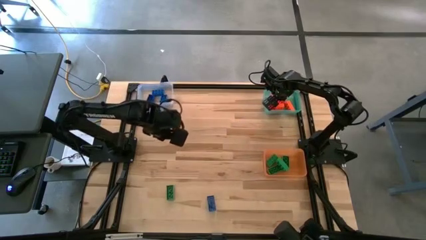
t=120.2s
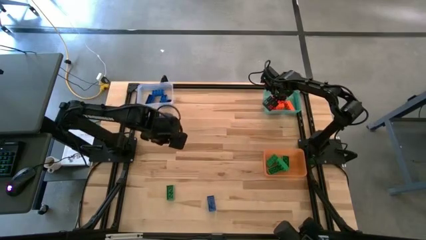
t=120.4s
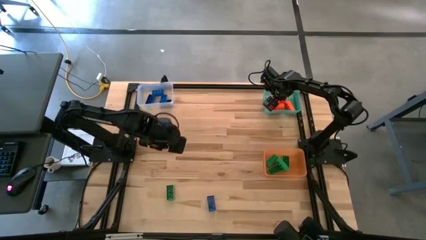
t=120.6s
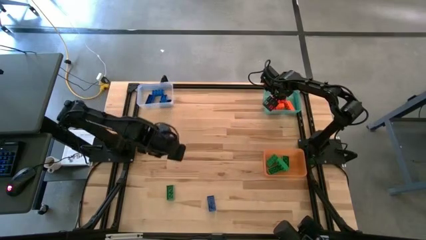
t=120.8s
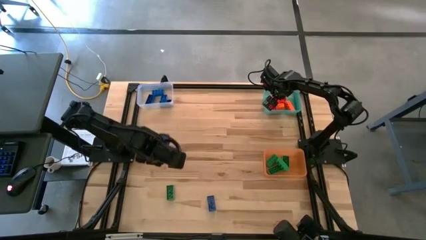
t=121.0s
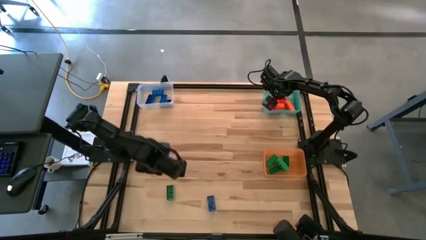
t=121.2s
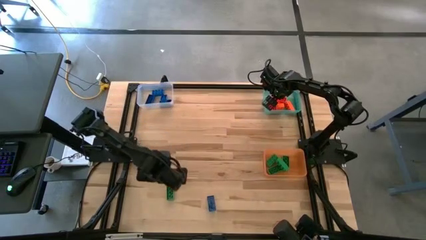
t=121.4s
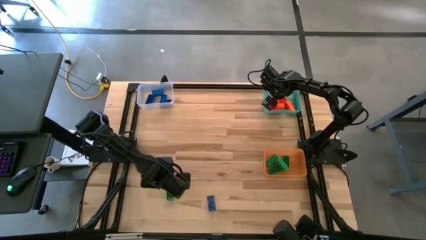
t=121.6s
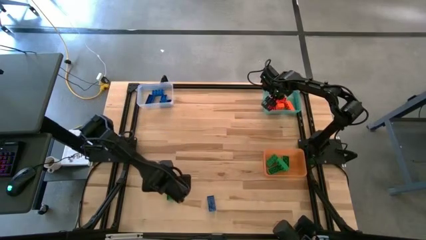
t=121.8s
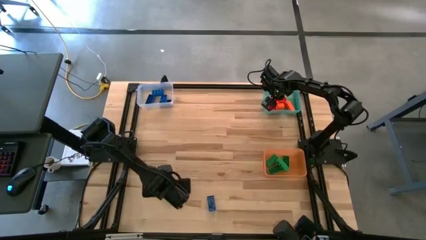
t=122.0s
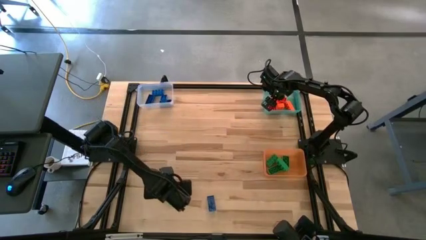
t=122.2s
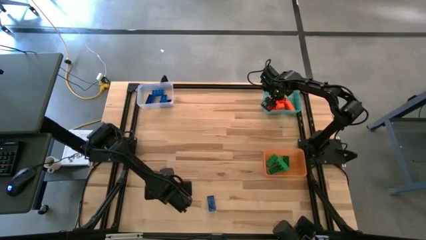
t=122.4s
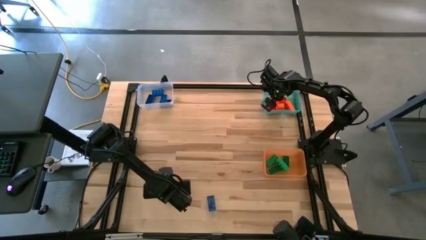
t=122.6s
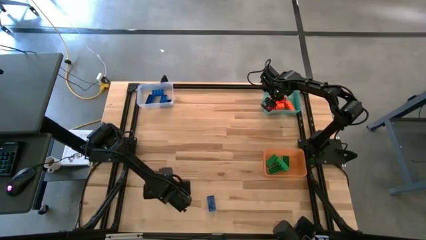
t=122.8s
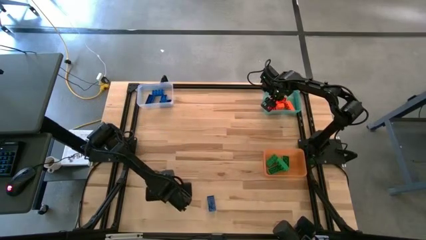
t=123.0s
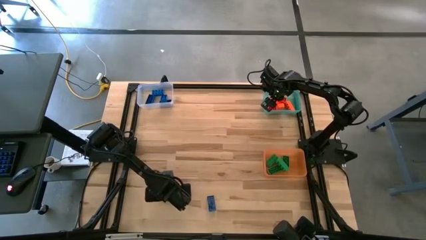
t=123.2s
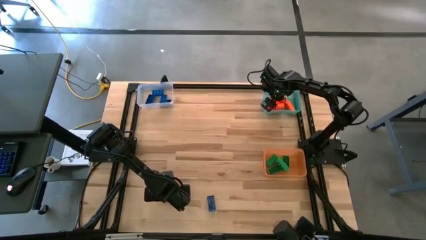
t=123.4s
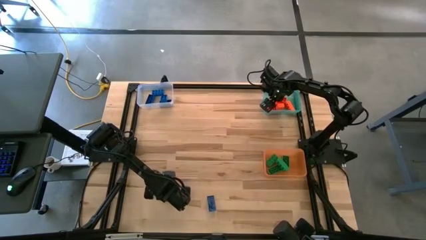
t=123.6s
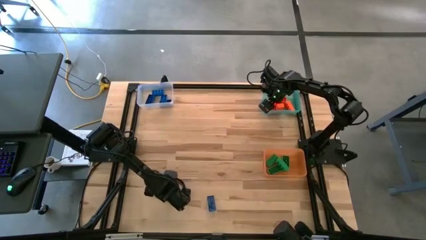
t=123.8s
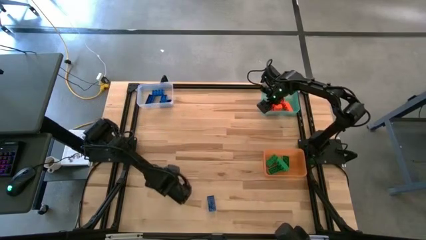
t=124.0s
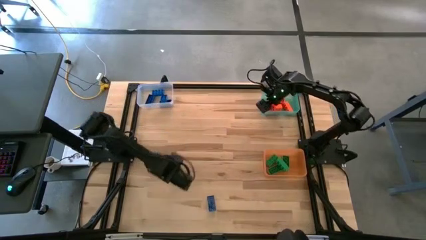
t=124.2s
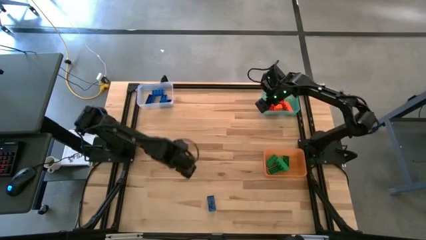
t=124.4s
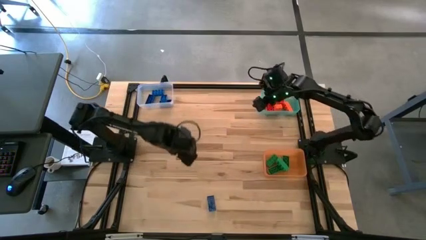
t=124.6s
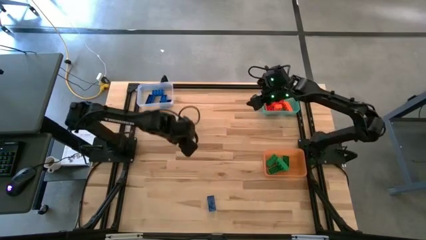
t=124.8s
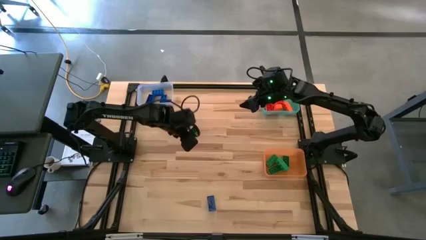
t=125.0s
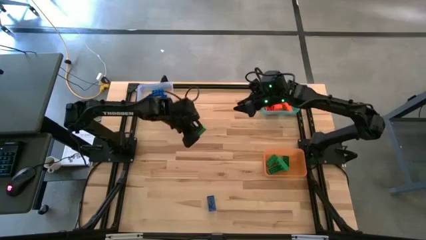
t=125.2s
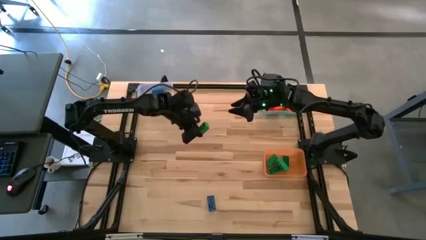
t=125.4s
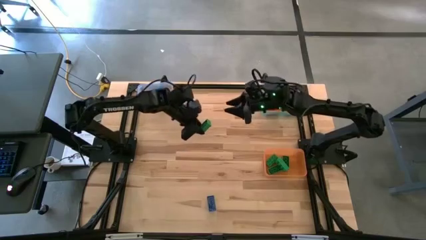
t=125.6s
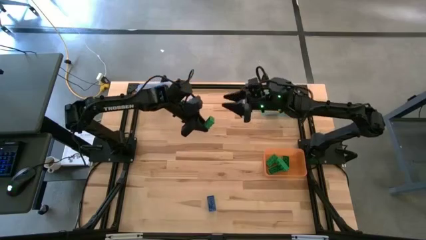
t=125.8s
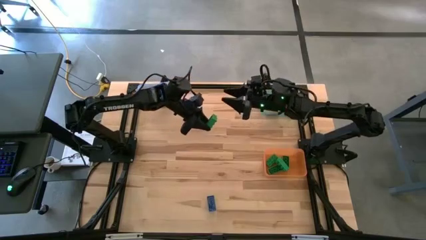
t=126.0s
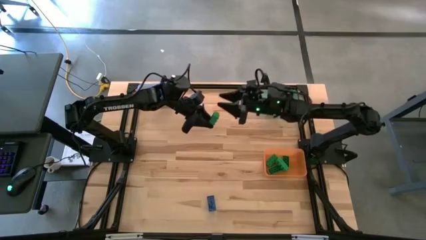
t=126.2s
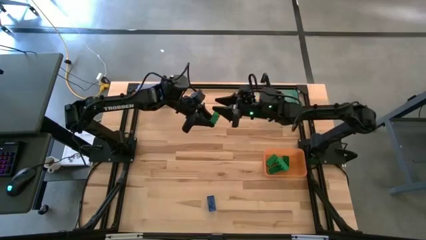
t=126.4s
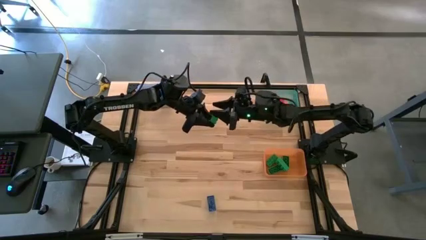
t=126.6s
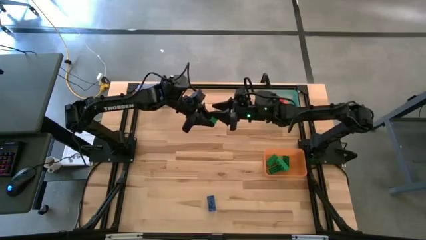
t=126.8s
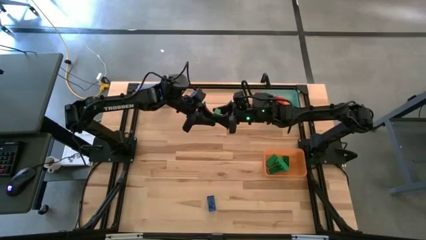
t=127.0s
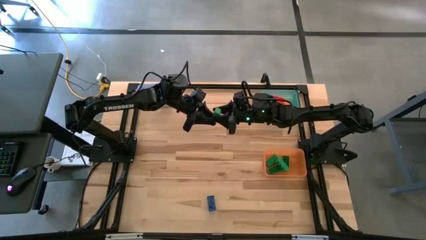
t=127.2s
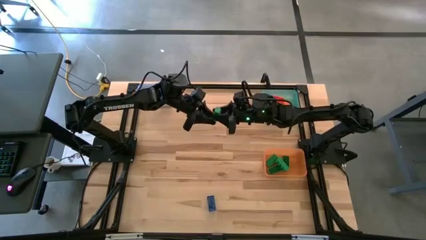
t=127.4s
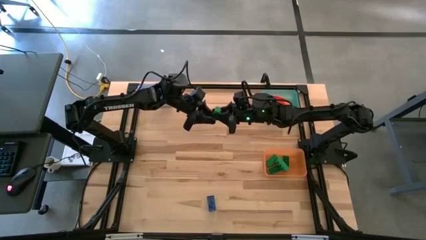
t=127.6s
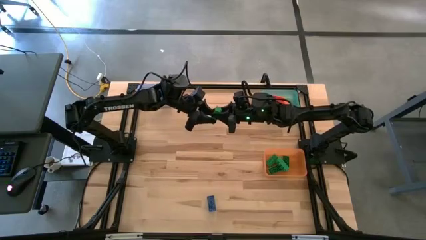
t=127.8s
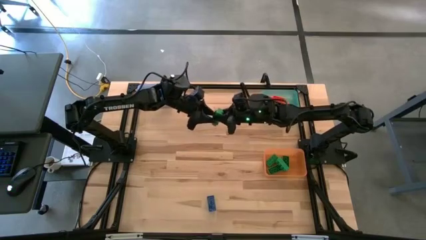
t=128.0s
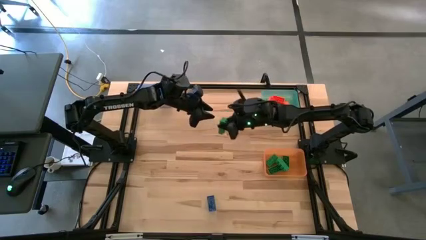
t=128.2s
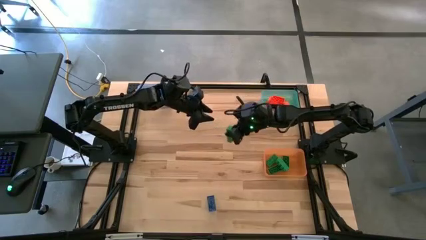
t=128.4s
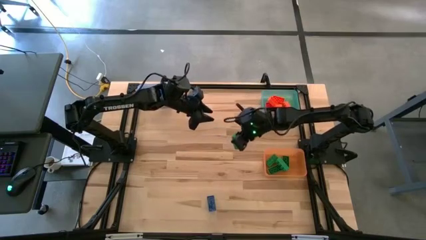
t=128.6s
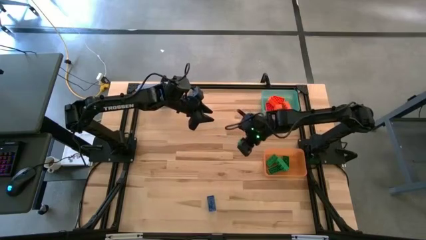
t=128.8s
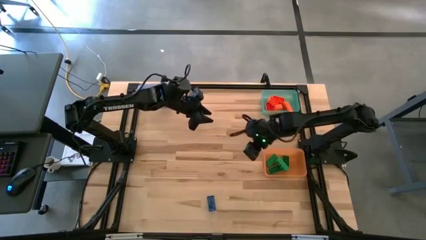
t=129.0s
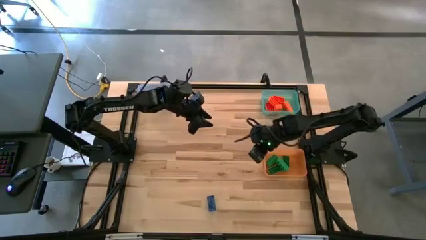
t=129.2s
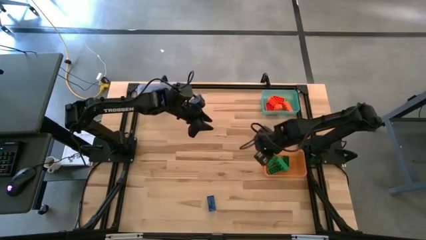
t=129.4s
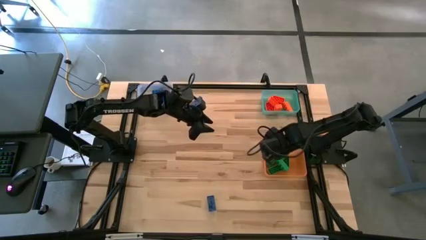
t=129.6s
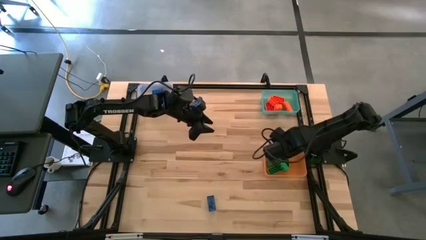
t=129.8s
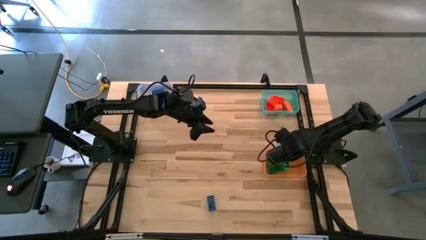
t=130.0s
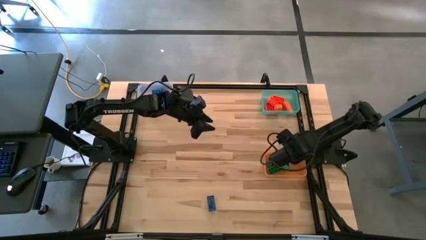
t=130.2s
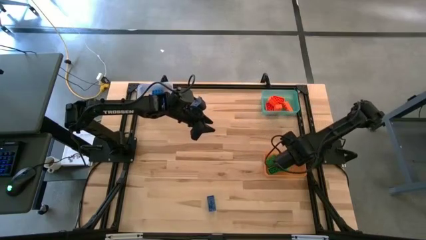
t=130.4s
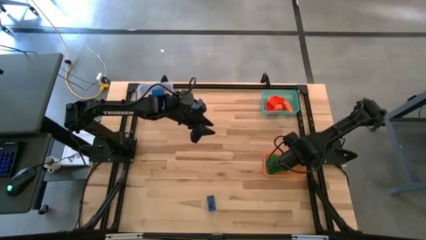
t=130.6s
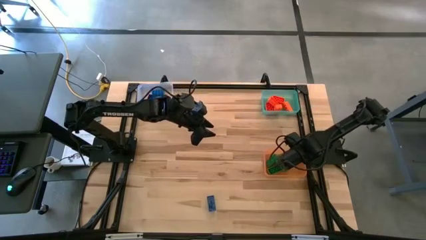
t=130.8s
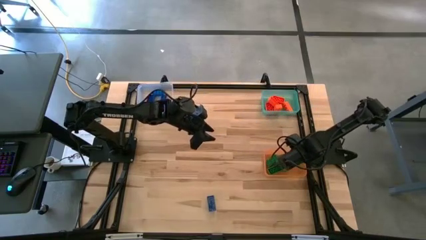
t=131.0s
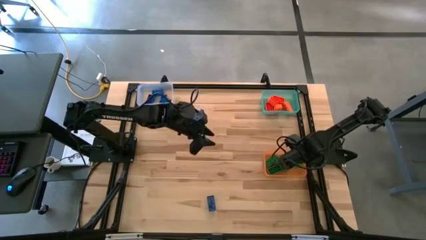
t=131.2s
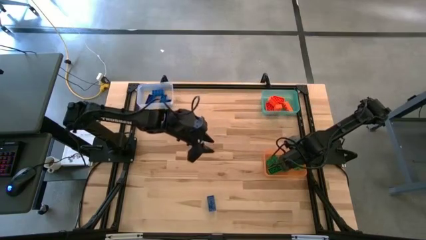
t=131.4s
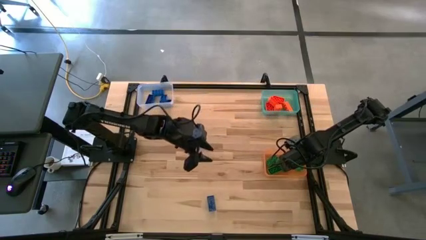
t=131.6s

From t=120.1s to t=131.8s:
Task: Sort & place blocks by color
Put the green game piece into the orange bin
